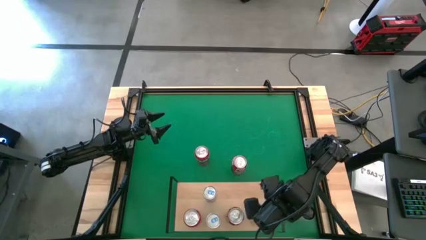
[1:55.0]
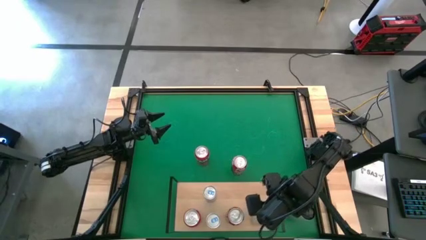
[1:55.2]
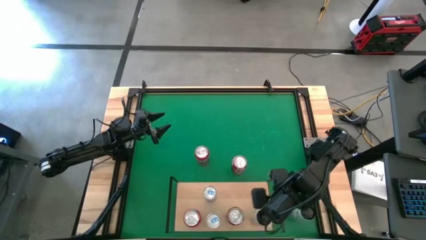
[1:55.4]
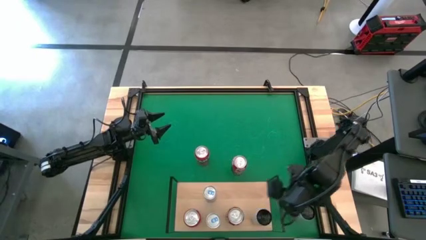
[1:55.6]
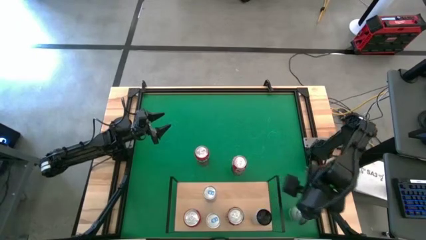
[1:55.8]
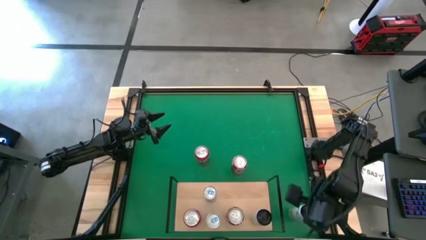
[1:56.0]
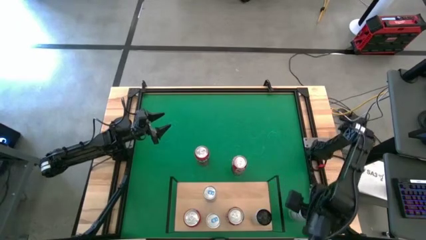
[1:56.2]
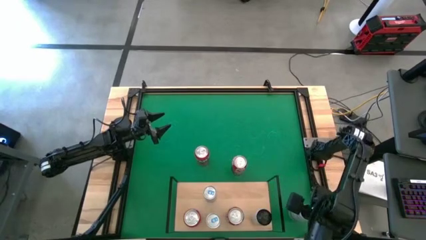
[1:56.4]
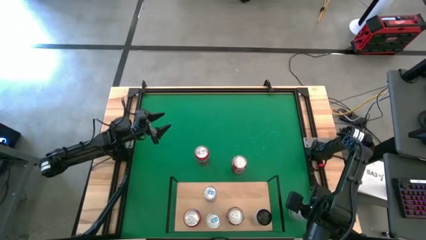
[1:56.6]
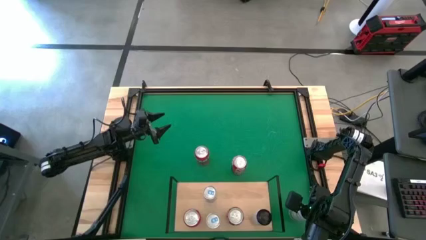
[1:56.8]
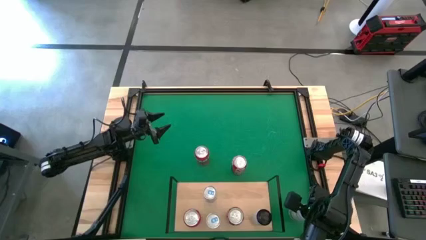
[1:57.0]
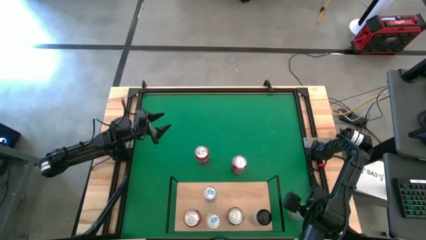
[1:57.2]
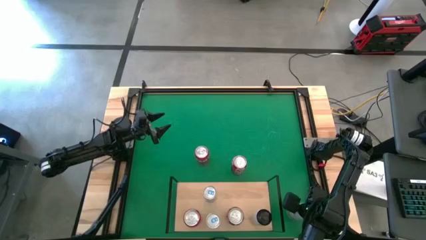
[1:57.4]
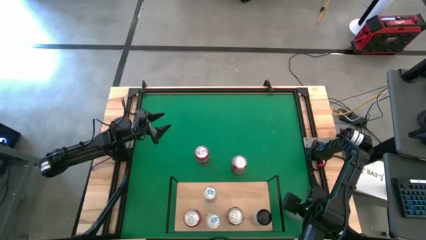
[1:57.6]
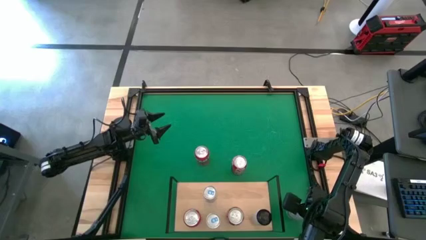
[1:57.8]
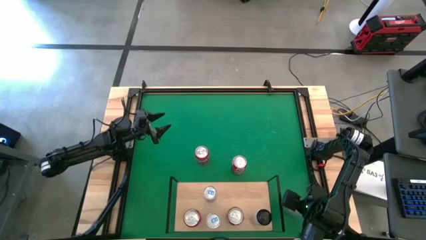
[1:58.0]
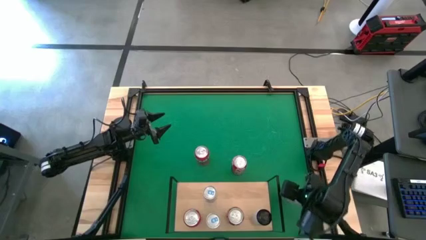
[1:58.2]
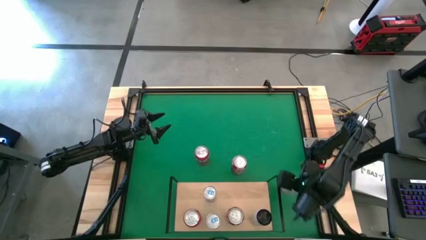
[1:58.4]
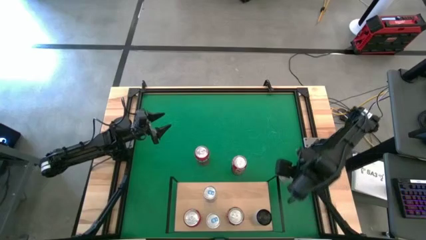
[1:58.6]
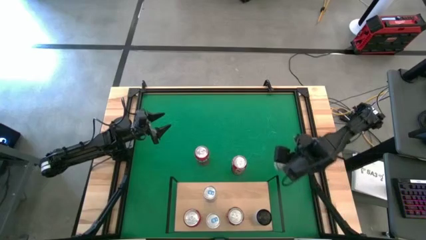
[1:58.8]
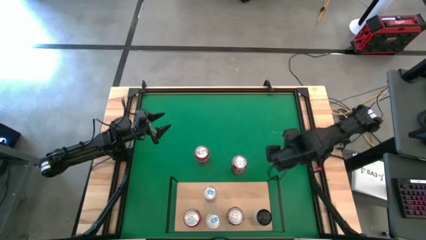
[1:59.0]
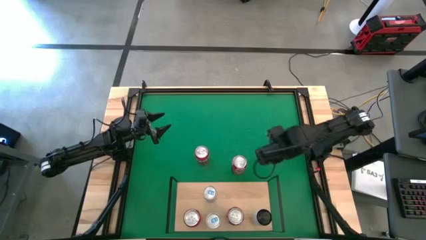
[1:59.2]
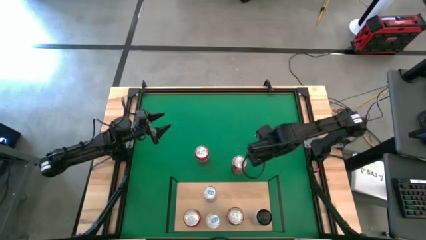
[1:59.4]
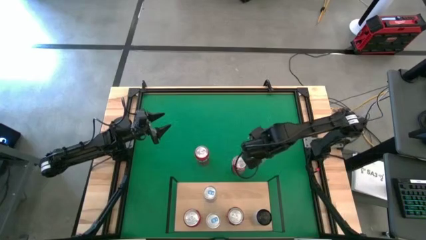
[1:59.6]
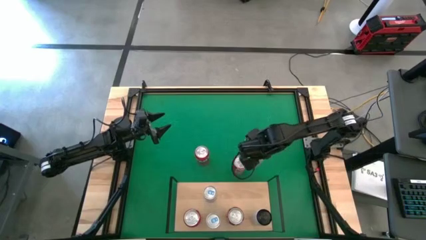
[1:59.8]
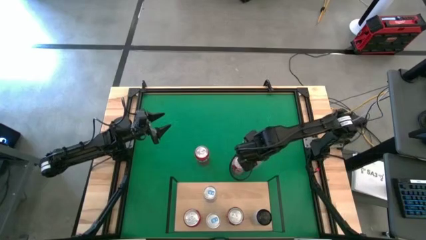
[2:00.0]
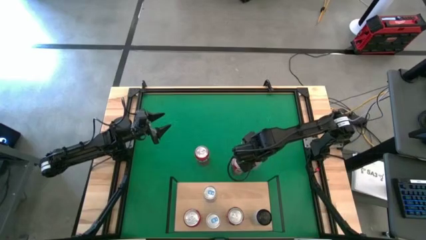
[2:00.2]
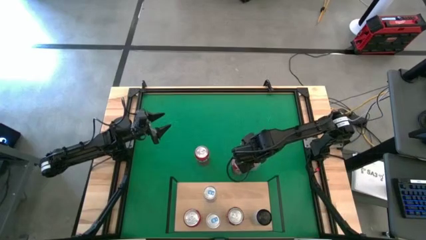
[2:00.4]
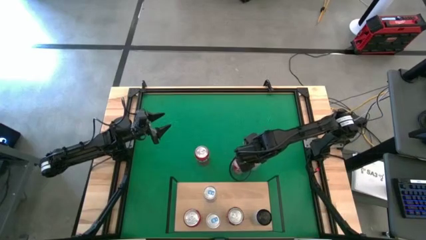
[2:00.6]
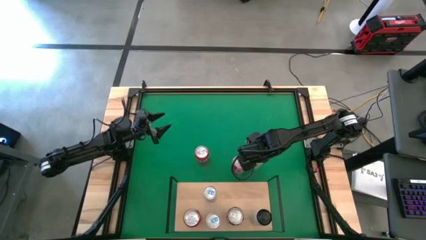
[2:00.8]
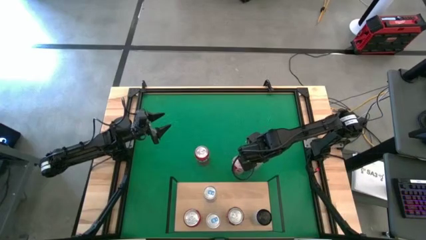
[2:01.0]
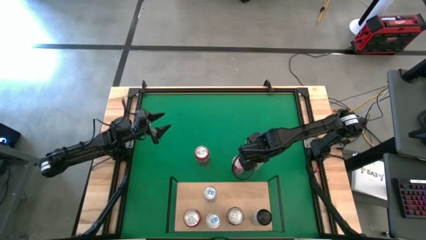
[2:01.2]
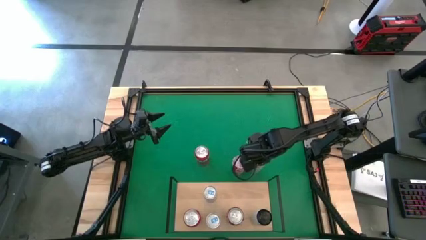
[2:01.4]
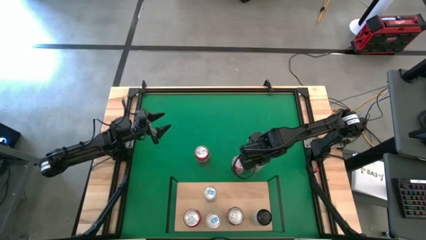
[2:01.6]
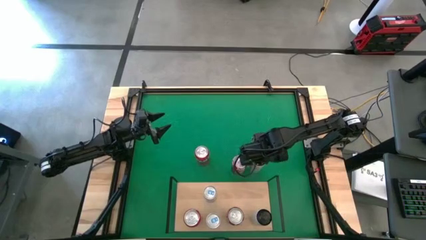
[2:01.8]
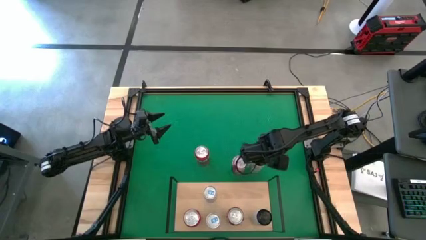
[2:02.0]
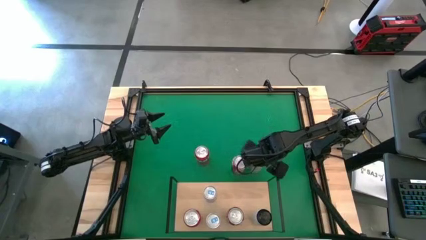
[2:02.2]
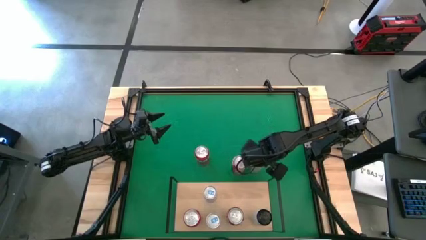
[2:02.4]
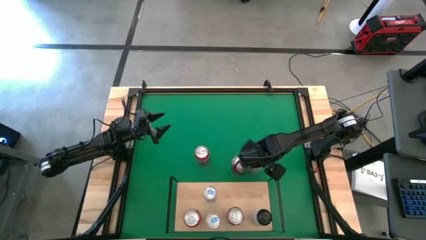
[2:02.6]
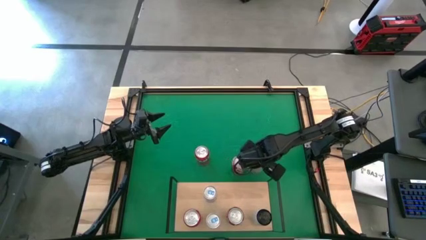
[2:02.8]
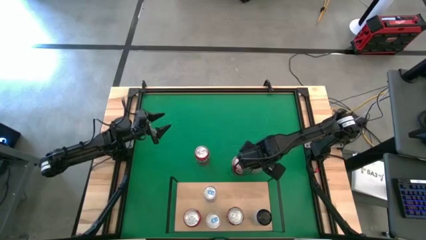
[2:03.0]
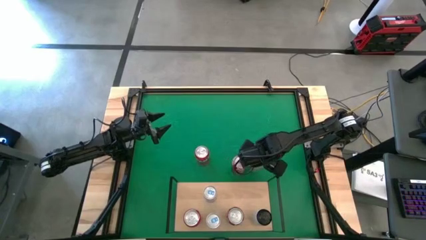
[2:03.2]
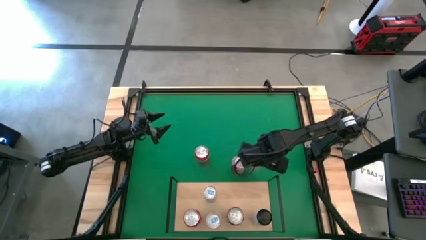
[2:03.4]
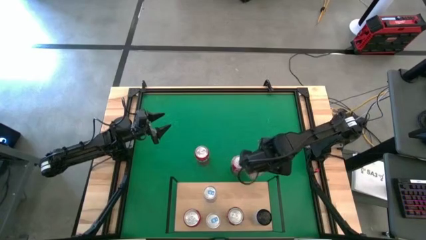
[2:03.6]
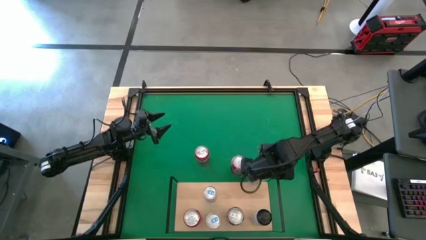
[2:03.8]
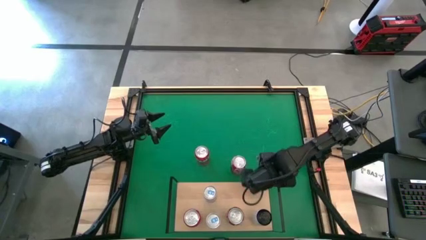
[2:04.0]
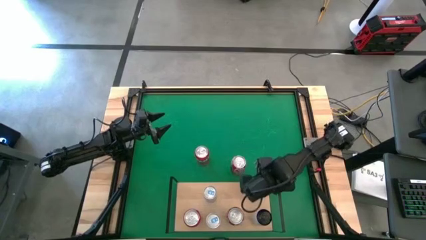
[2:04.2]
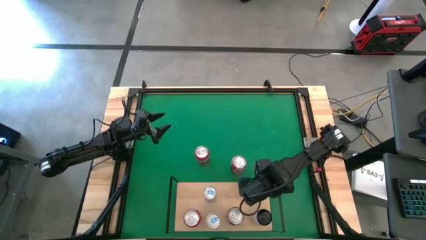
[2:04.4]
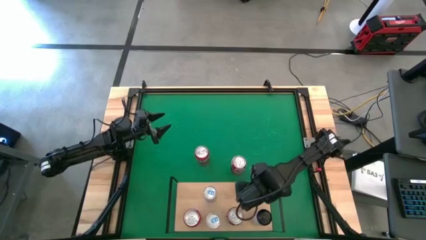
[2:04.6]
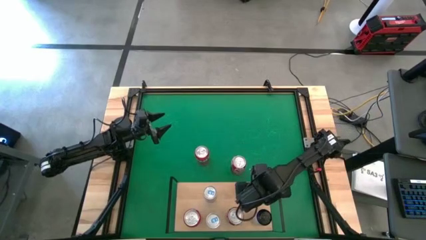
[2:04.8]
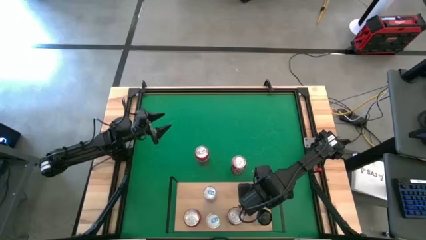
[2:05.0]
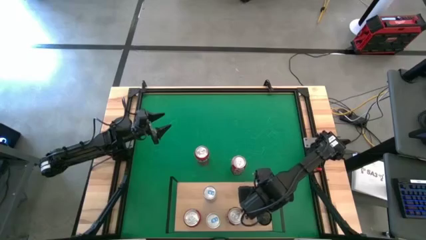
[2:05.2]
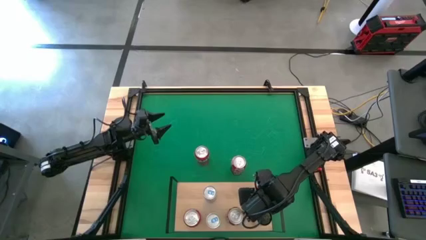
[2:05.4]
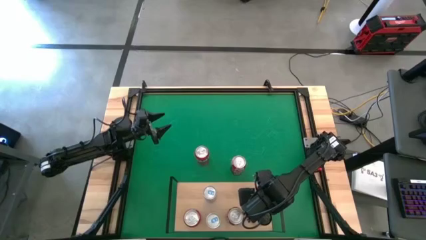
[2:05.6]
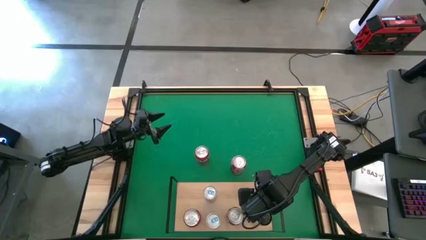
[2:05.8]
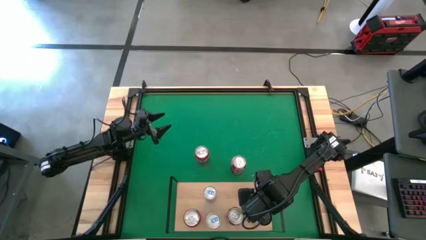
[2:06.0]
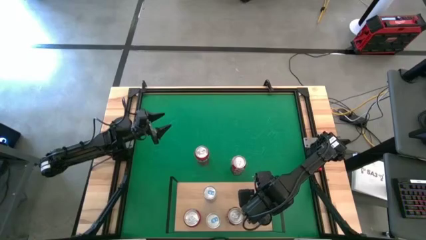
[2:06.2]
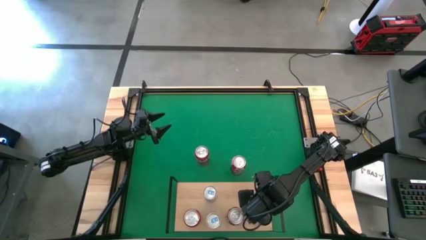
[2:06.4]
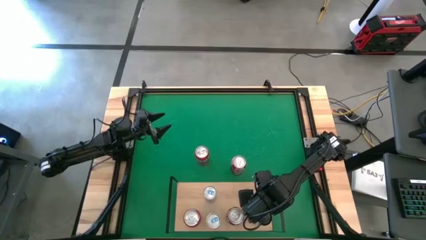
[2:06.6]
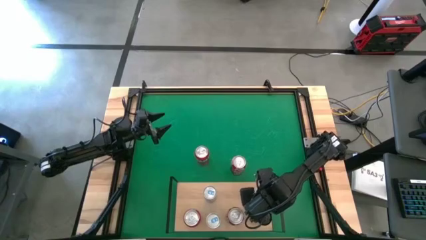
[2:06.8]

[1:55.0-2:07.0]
Task: Place canned beverage on shelf
Put the white soda can aligned with the other white soda can on the shelf

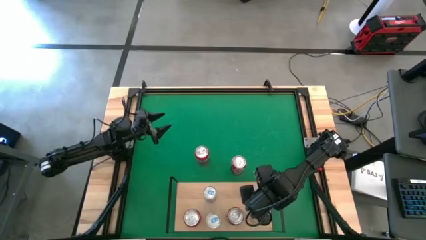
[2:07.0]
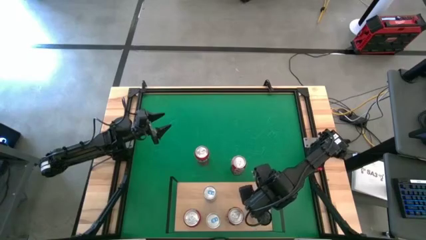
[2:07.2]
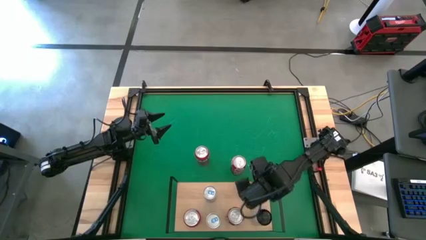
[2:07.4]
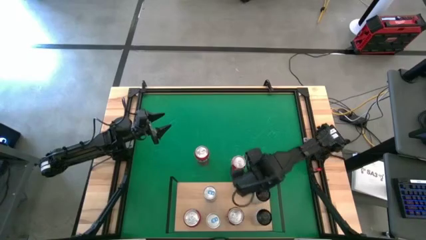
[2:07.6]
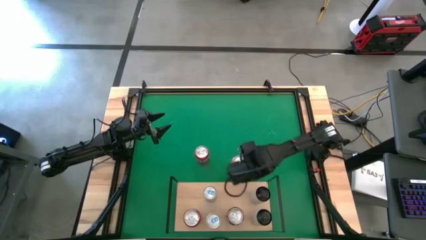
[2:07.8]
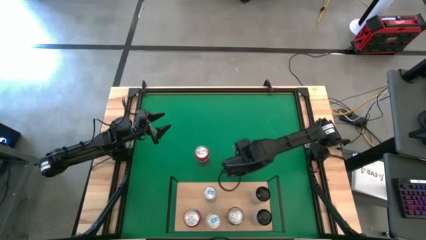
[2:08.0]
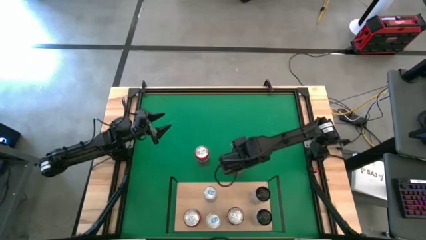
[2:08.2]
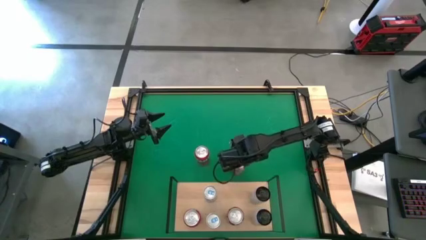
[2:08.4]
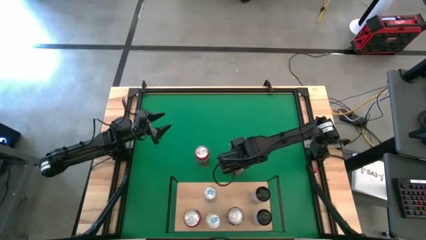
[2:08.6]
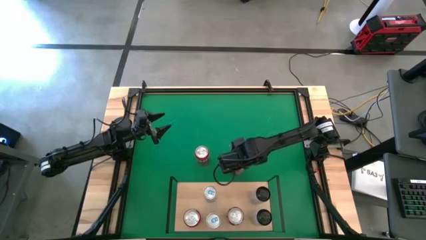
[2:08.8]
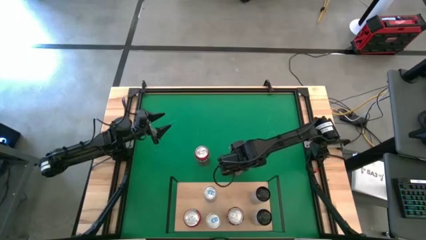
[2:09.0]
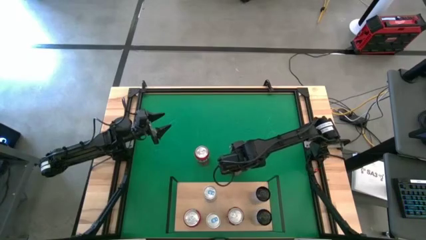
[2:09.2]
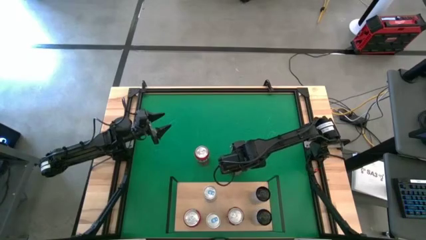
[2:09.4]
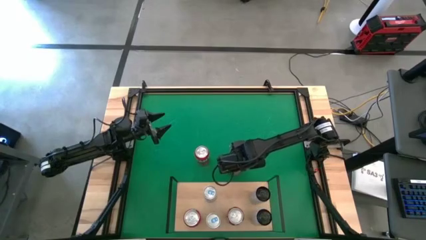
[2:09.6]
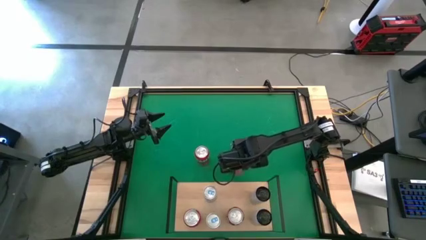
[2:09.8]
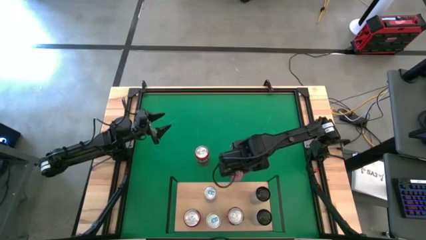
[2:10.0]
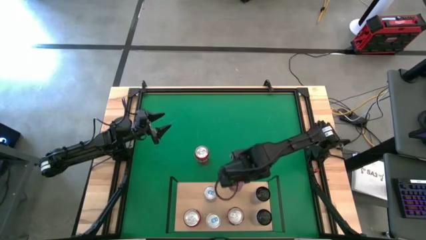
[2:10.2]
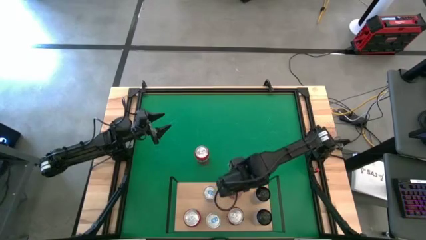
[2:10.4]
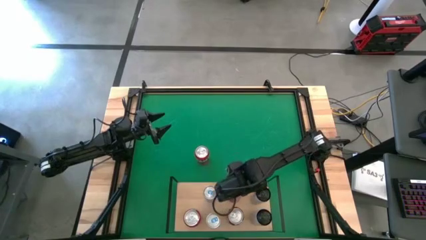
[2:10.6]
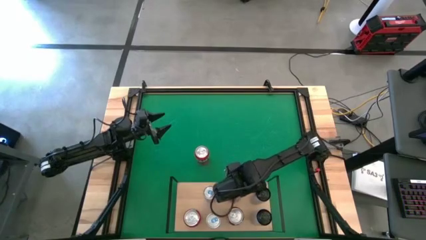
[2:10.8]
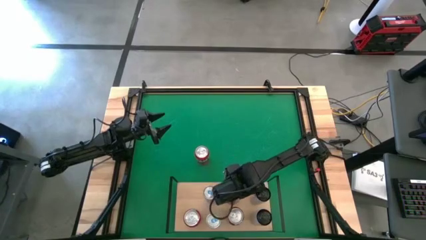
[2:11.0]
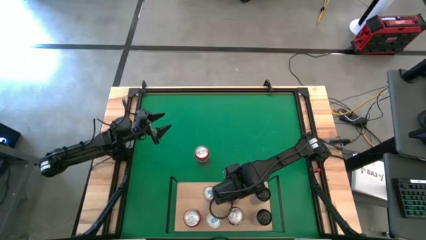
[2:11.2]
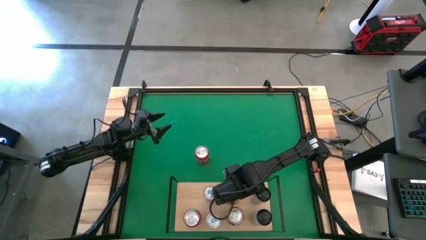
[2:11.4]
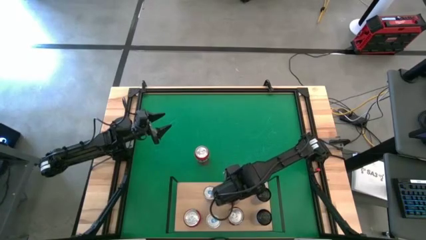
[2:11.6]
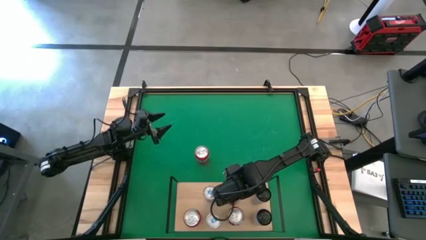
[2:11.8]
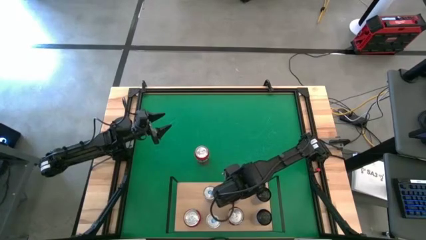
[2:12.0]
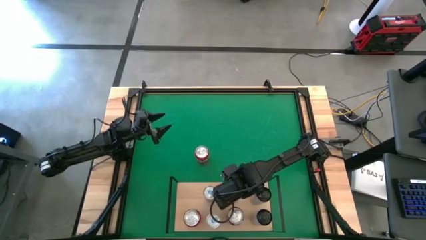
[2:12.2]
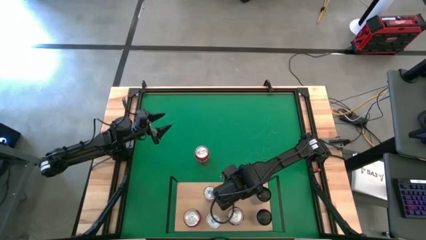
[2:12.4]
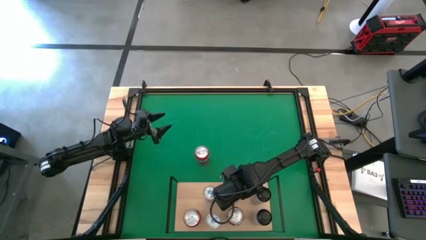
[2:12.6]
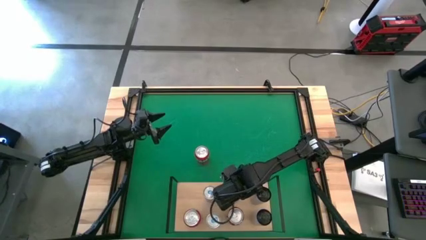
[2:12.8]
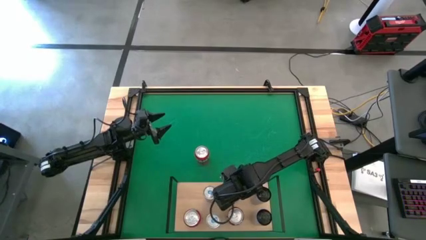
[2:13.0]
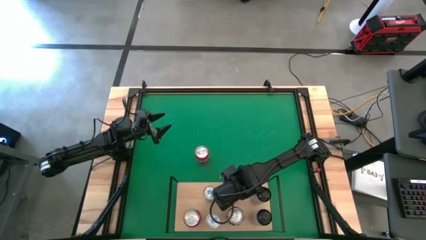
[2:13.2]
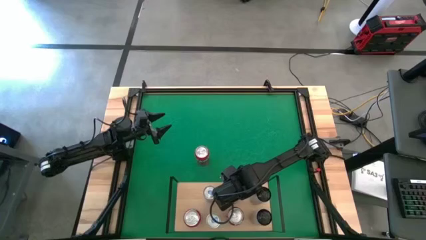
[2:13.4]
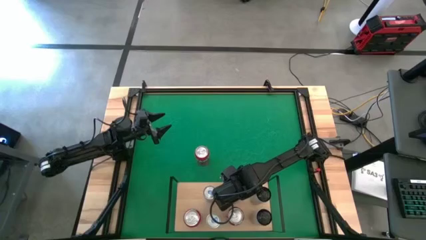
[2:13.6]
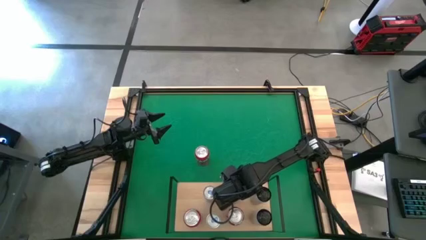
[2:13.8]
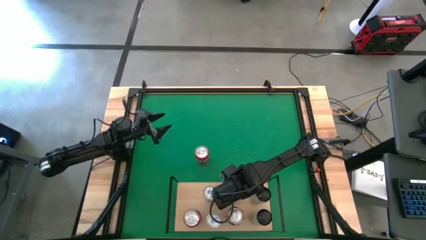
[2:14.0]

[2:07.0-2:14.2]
Put the red soda can aligned with the other red soda can on the shelf
